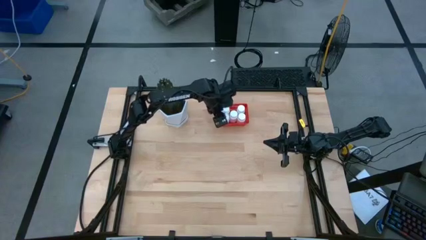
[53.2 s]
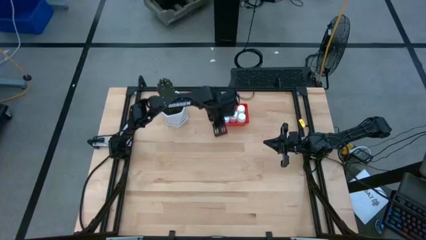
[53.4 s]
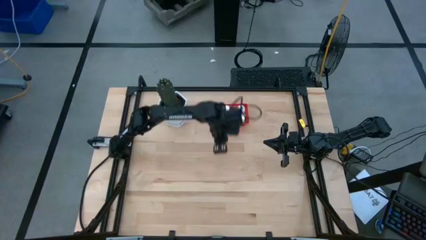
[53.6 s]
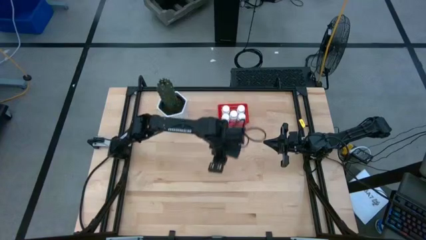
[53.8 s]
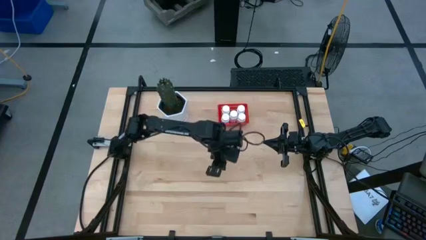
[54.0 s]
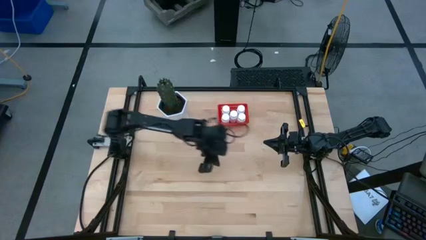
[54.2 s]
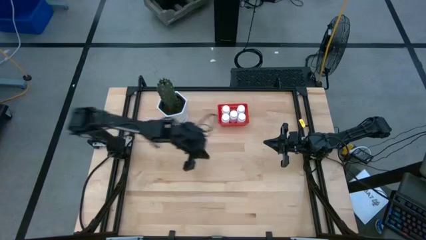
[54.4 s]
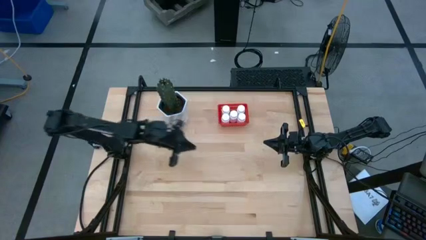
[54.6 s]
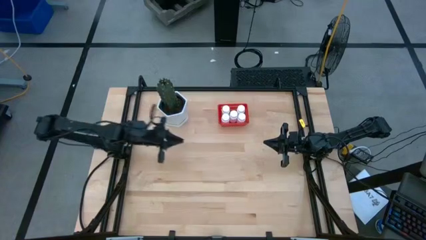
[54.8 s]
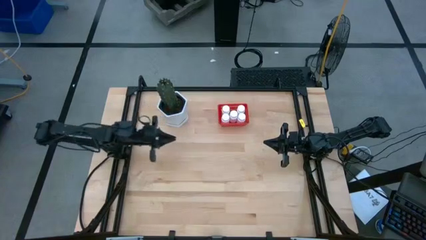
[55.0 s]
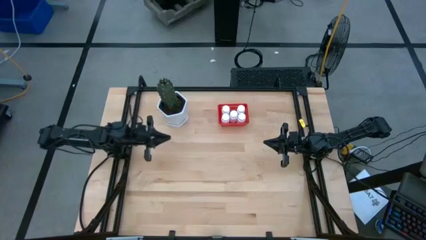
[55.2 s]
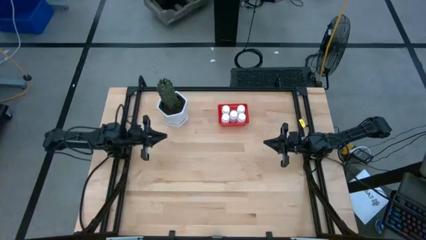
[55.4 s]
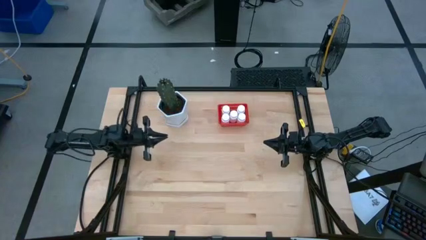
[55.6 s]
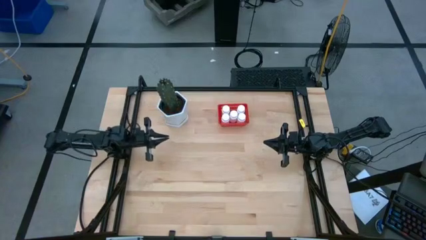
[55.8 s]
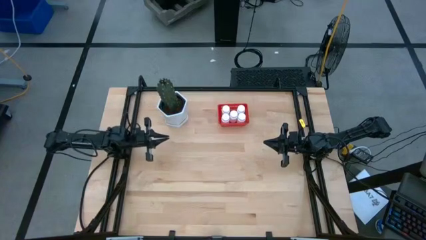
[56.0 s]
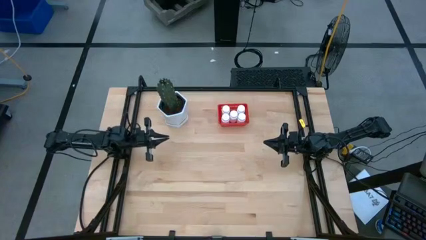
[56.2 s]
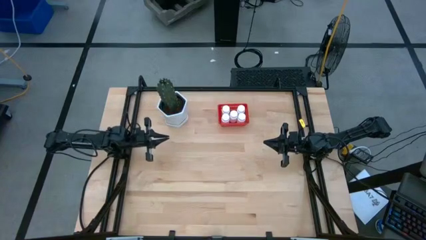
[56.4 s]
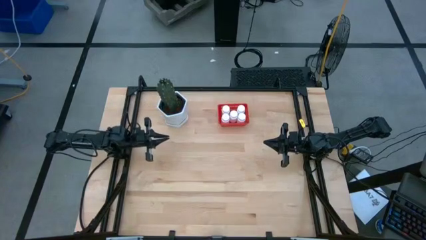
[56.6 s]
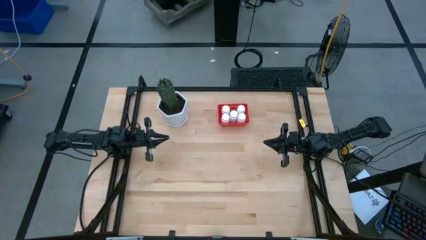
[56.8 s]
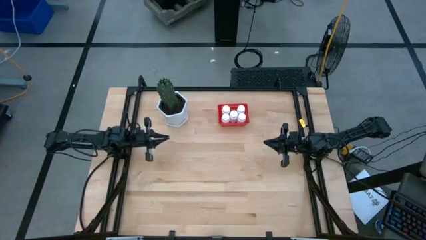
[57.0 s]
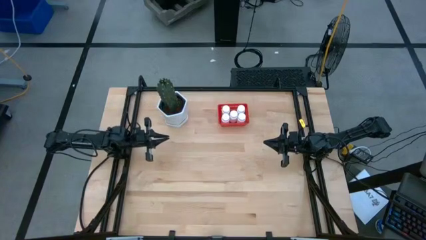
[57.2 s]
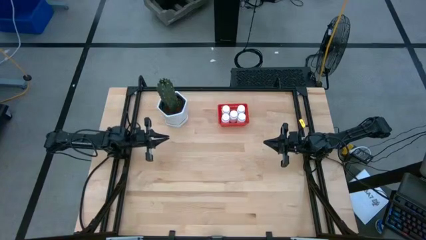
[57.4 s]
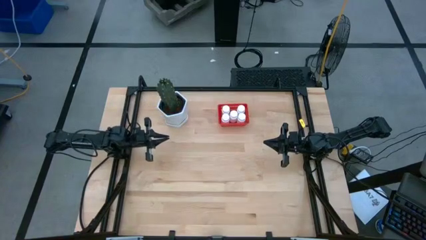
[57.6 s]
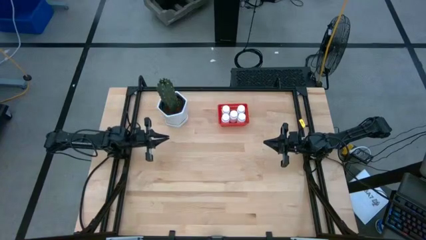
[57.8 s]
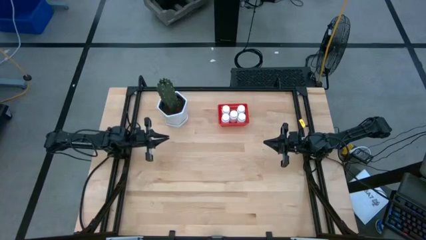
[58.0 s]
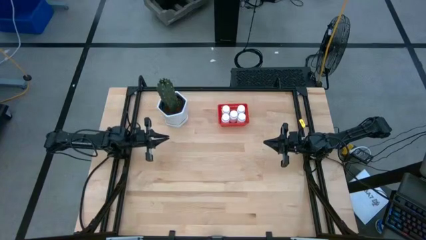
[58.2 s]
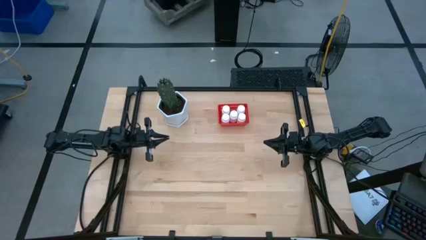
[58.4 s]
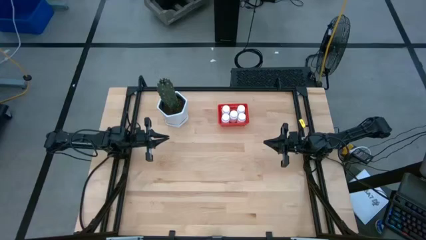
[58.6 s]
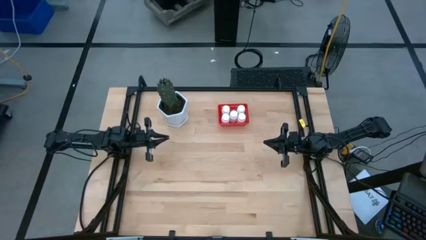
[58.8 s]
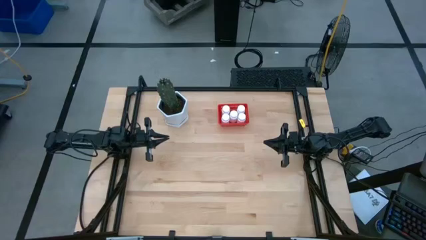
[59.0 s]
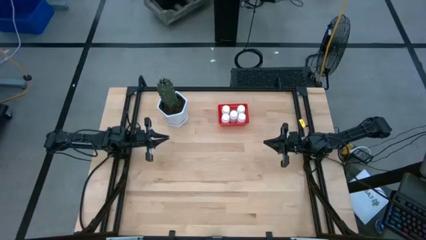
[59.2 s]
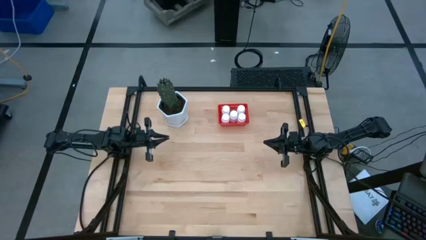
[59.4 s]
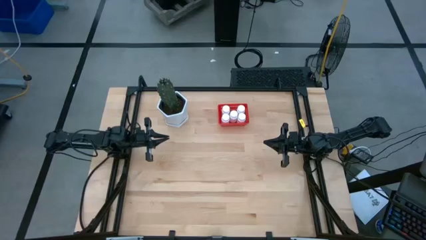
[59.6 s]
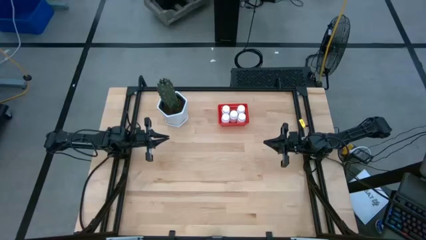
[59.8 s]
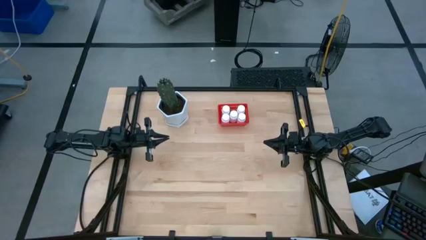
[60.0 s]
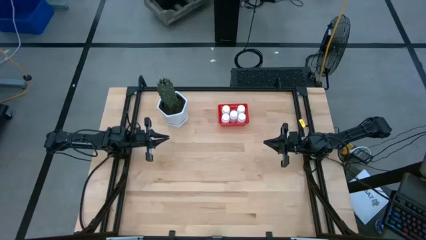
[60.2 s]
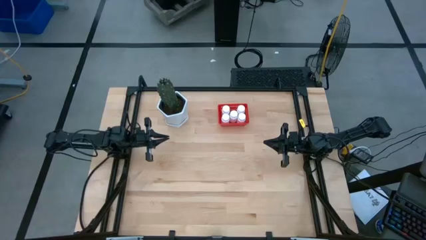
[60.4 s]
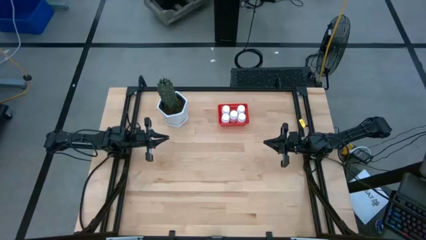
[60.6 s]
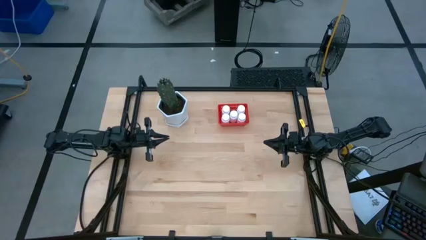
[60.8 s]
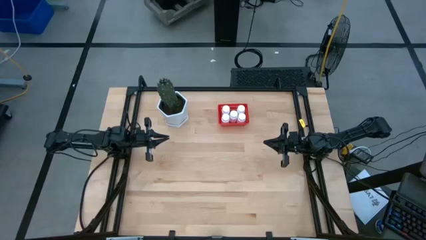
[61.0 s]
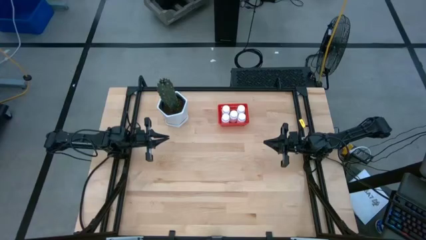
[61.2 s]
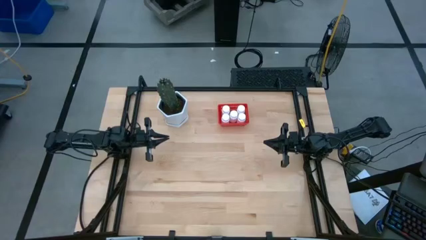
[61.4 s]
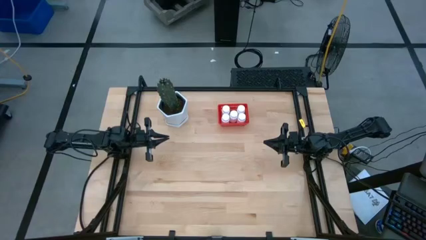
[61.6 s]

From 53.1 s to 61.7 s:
Task: Pick and place pill bottles into a basket
Return to Home Position

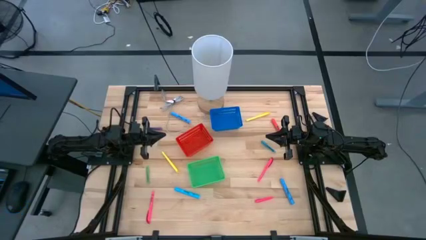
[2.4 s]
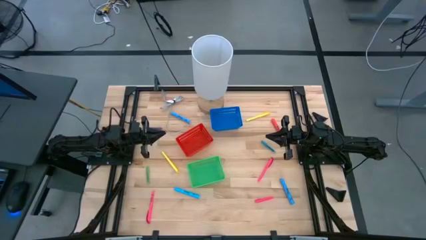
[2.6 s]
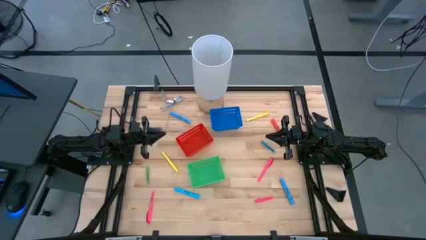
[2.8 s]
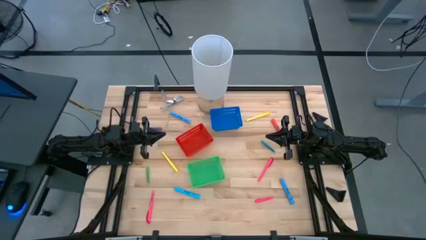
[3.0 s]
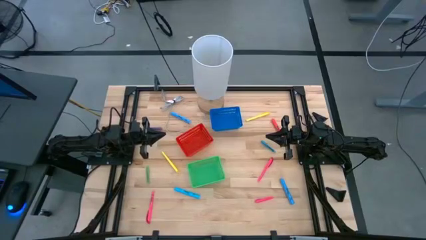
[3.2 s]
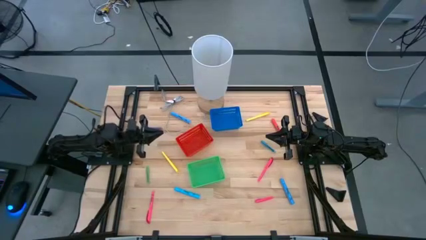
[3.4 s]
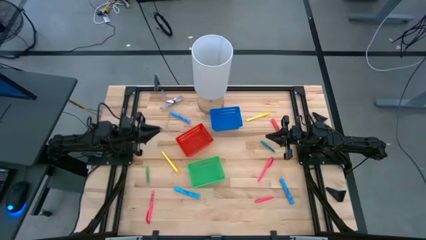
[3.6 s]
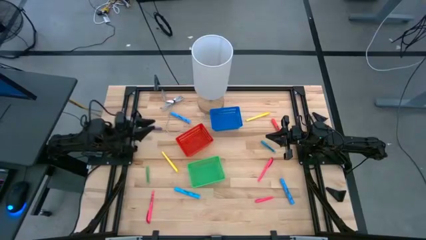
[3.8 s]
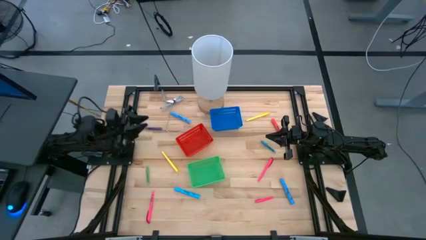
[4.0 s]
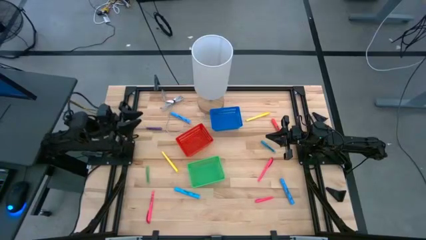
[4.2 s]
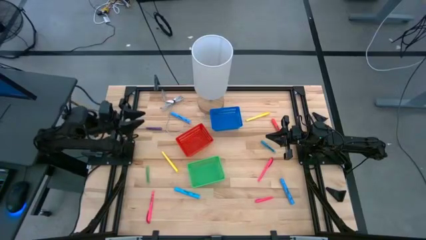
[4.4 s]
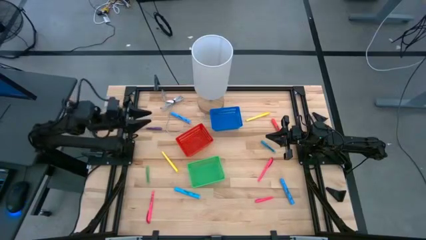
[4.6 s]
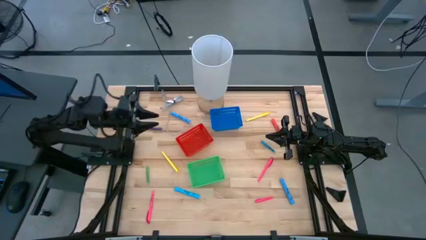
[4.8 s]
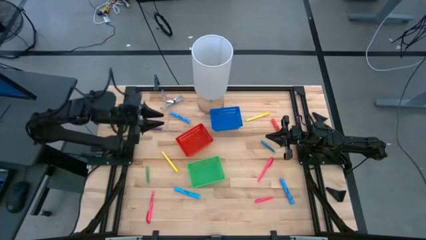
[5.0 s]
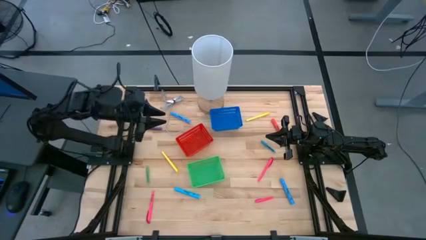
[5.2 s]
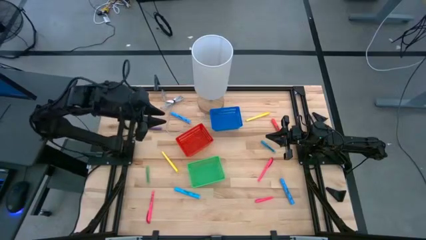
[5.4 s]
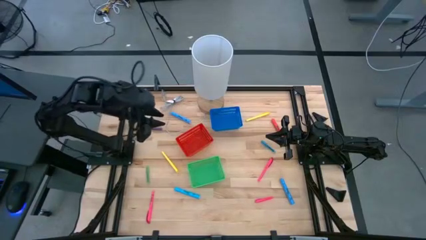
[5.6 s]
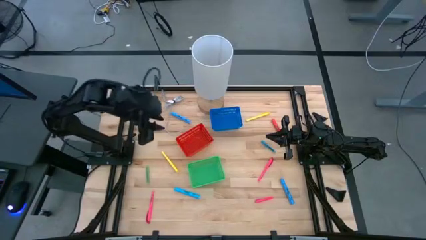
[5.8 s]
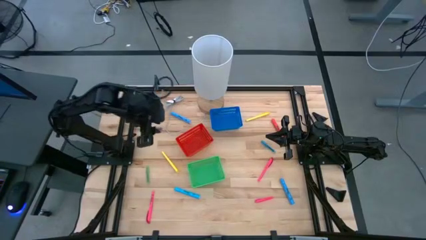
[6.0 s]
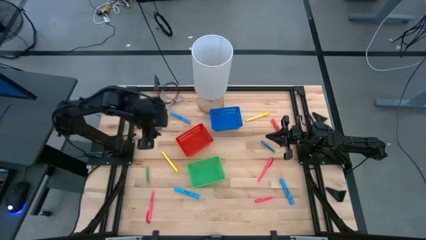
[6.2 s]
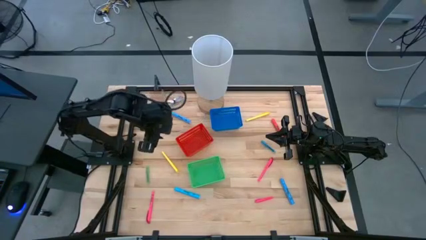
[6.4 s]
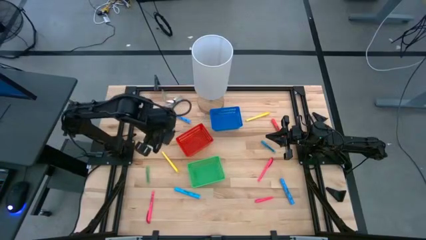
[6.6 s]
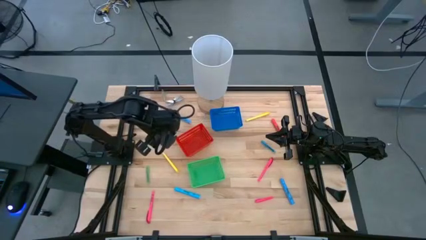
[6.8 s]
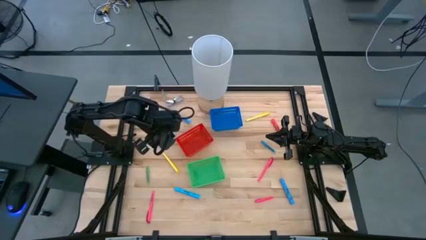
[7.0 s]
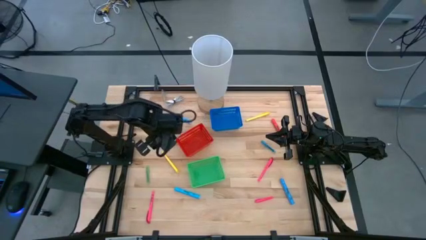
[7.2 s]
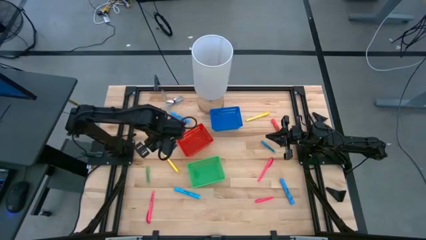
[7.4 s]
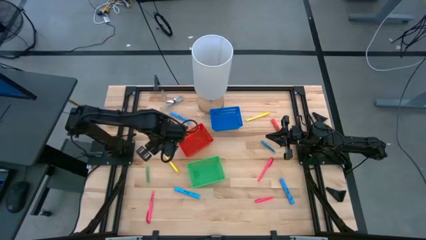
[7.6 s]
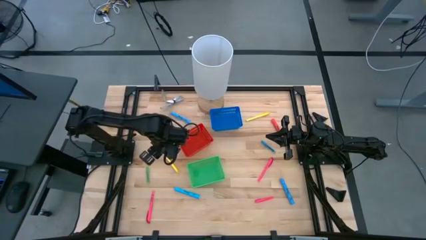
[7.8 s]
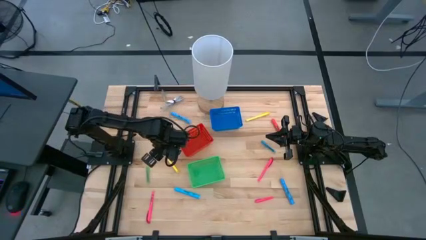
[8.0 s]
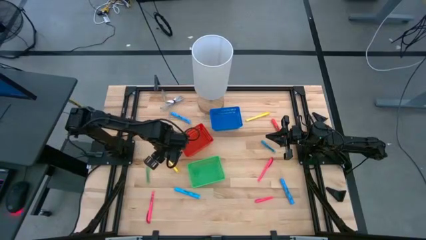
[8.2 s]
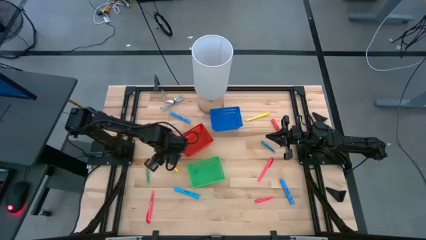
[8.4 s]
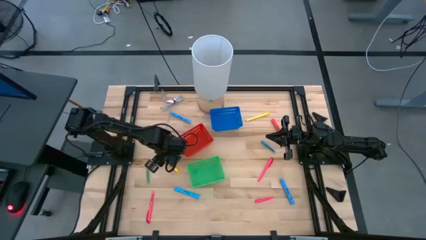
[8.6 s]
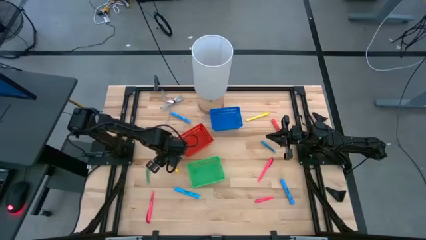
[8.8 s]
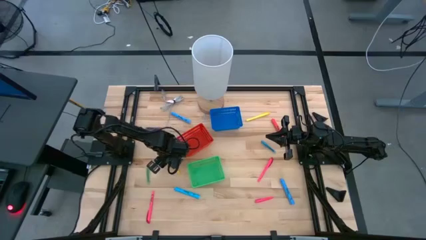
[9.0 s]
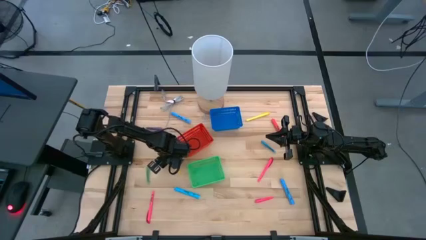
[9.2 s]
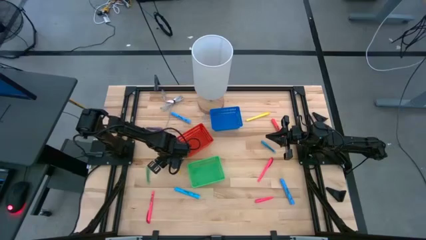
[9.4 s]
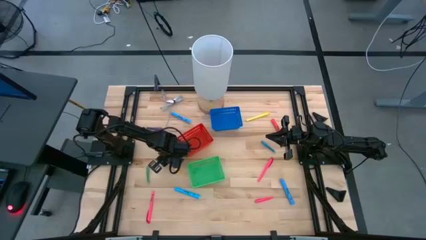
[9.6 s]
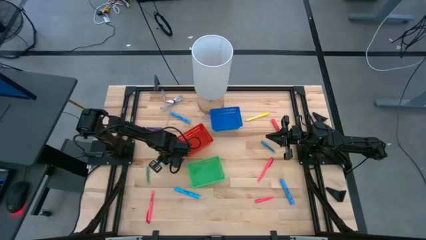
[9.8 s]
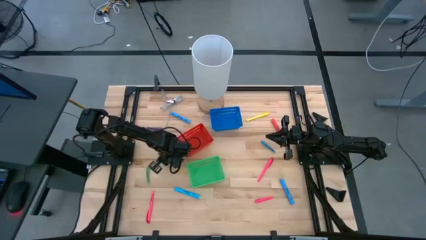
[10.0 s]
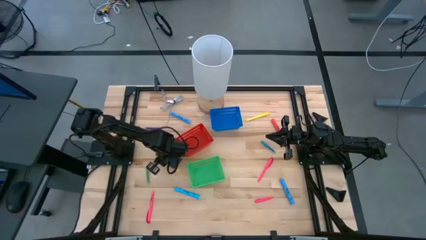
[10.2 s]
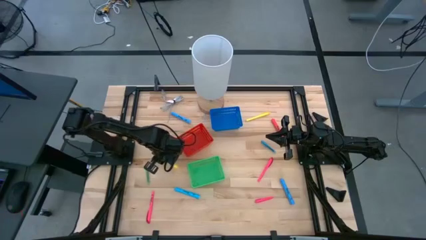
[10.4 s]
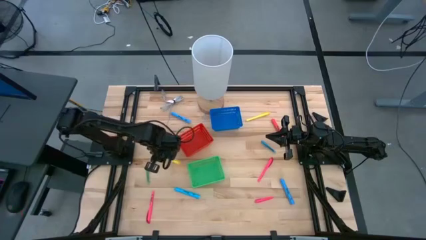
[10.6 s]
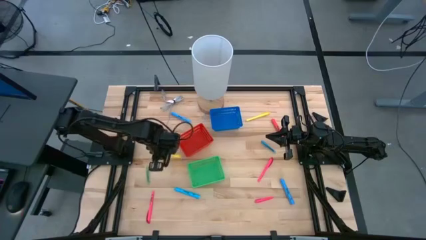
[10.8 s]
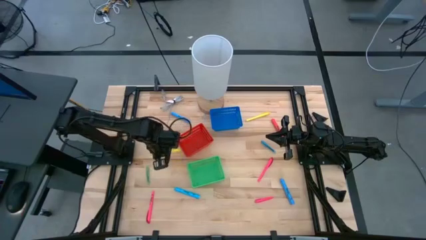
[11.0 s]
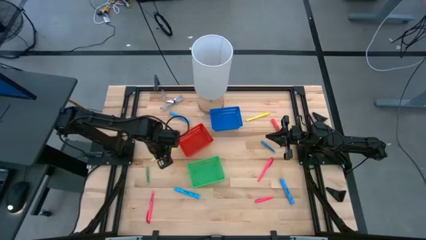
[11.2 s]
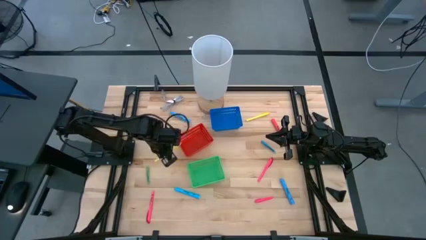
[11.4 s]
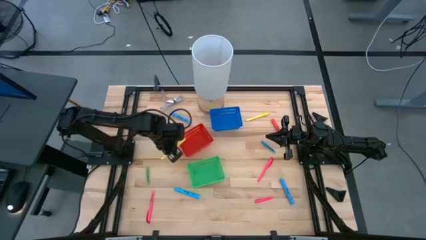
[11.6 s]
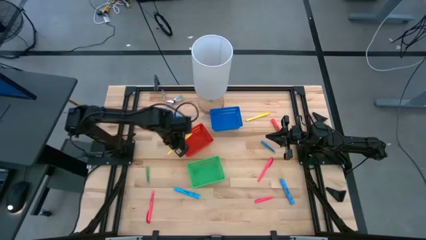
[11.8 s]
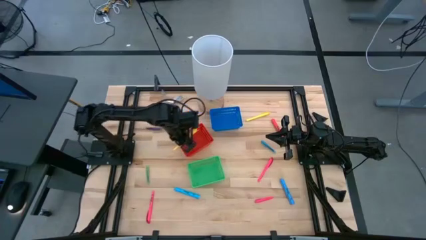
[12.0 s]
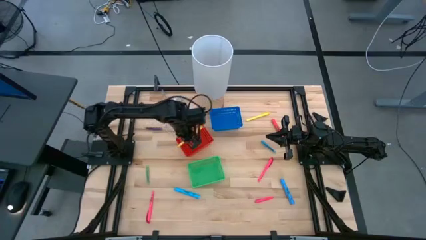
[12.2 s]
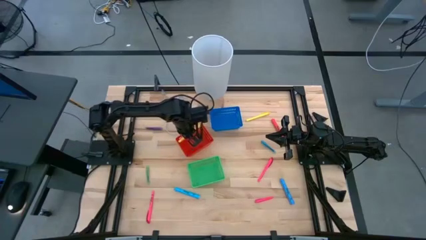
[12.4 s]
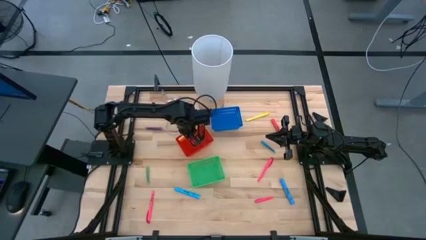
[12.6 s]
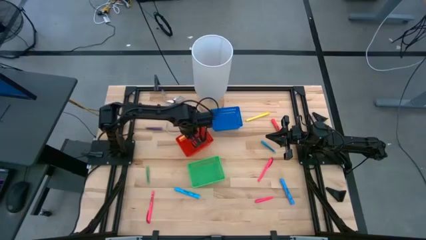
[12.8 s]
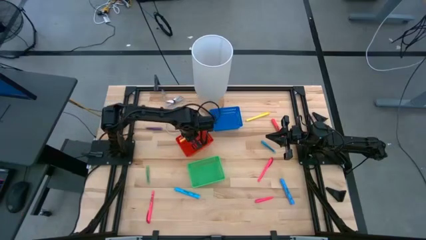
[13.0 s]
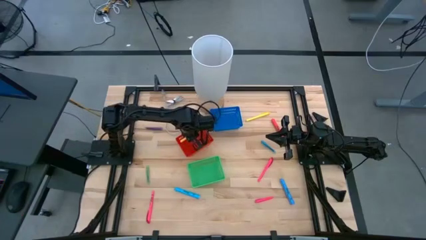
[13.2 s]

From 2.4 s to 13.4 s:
Task: Pick & Place Markers
Put the left yellow marker into the red bin
